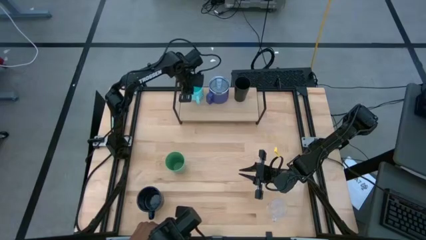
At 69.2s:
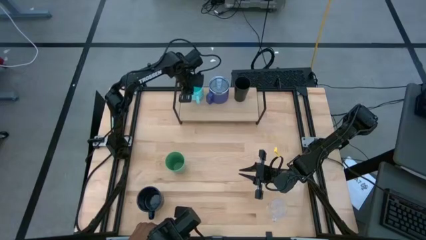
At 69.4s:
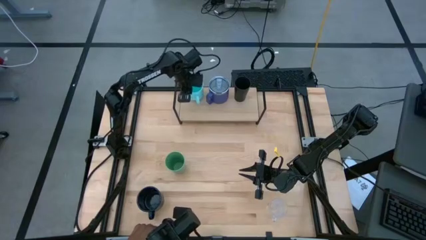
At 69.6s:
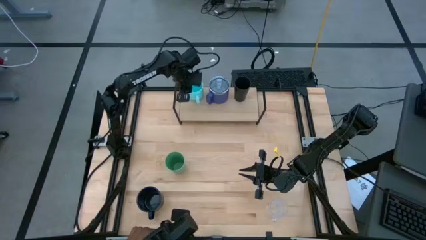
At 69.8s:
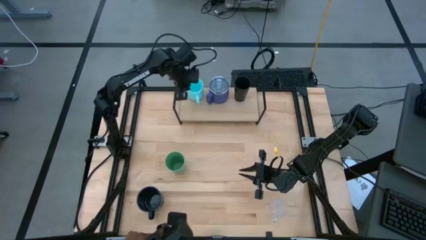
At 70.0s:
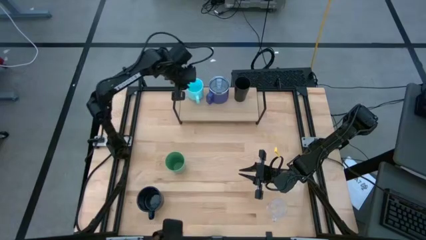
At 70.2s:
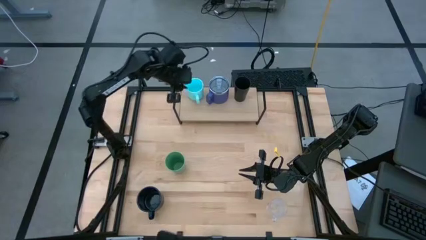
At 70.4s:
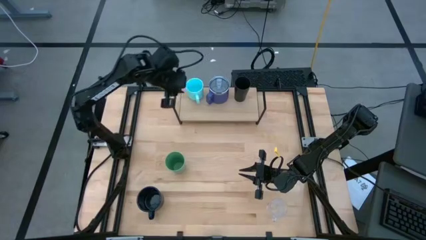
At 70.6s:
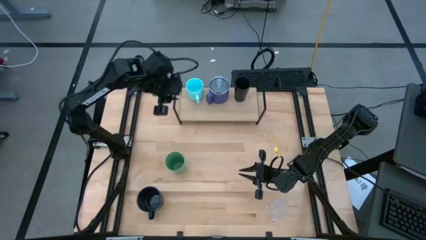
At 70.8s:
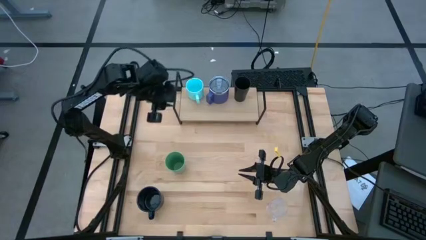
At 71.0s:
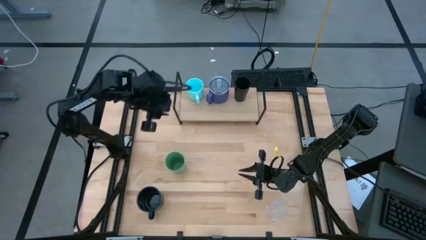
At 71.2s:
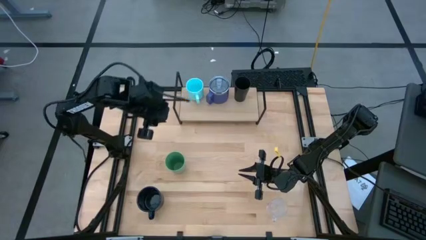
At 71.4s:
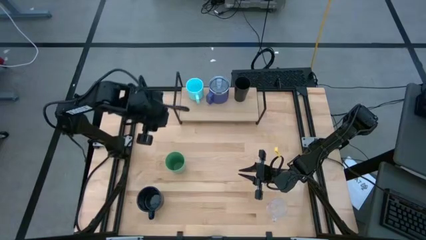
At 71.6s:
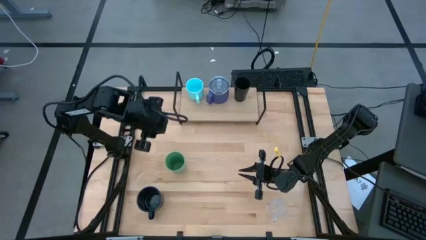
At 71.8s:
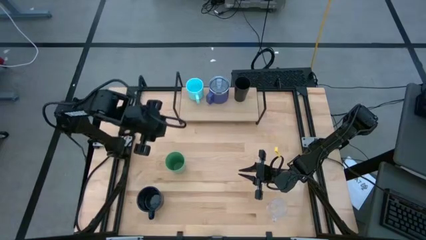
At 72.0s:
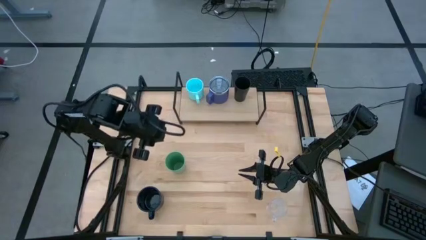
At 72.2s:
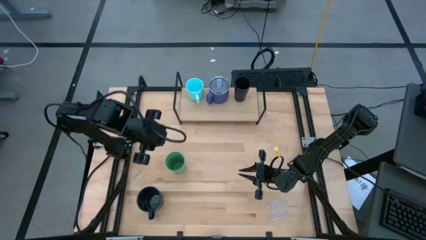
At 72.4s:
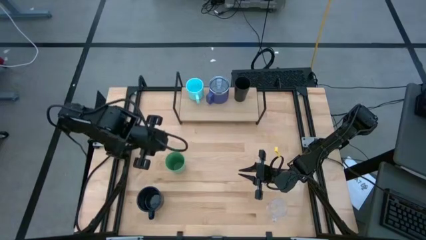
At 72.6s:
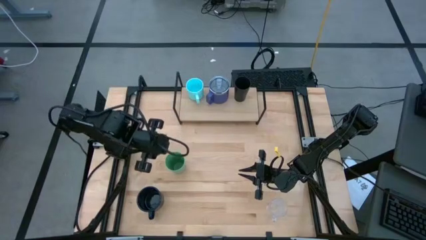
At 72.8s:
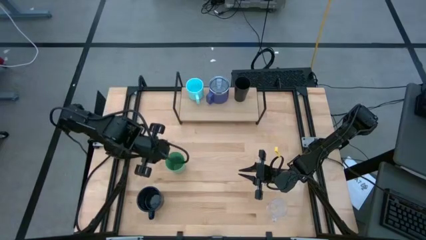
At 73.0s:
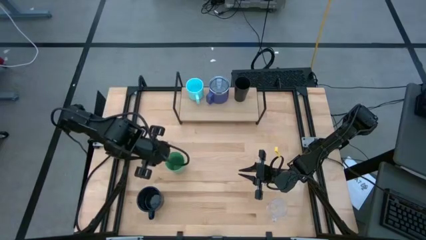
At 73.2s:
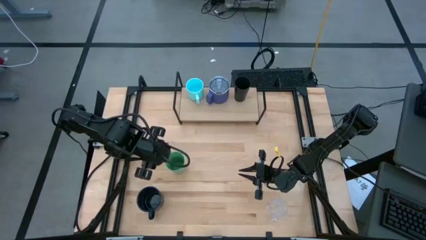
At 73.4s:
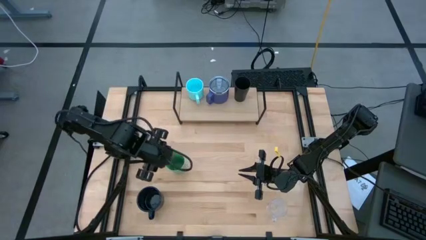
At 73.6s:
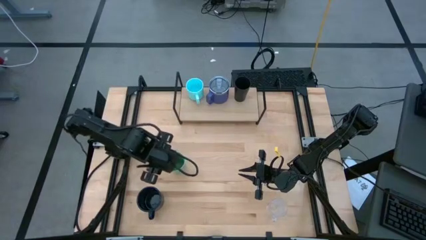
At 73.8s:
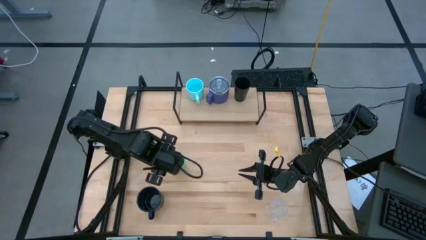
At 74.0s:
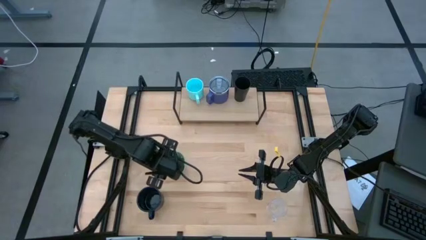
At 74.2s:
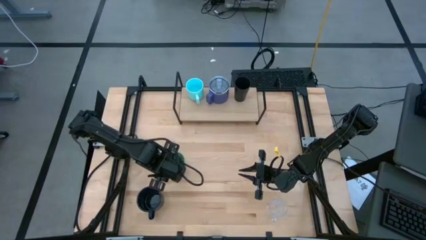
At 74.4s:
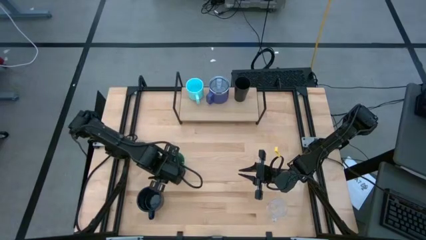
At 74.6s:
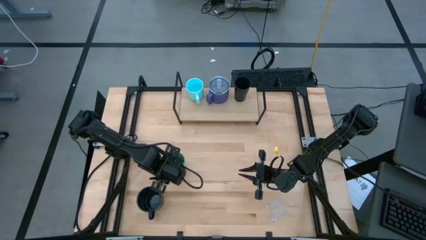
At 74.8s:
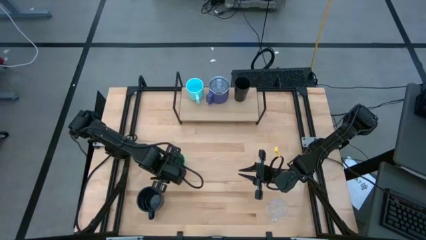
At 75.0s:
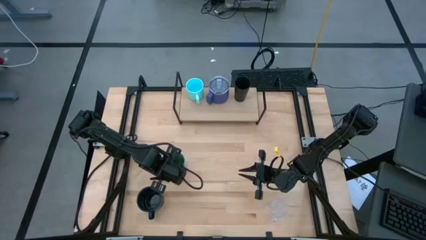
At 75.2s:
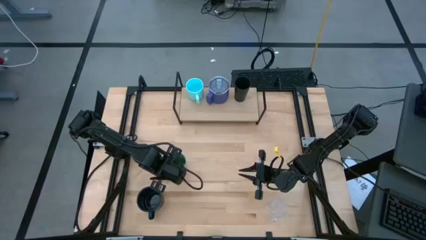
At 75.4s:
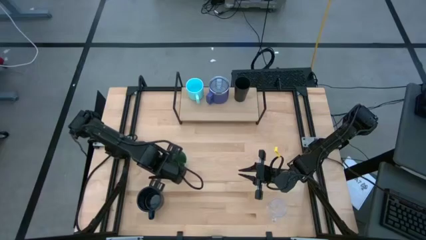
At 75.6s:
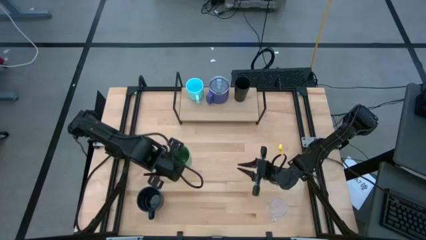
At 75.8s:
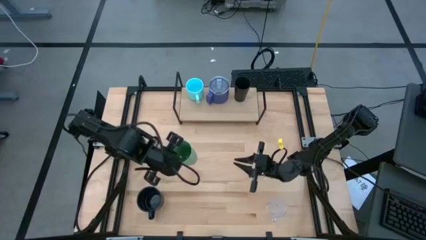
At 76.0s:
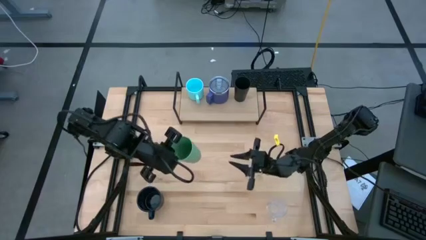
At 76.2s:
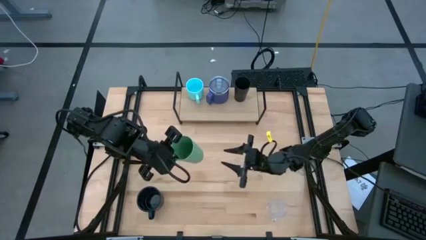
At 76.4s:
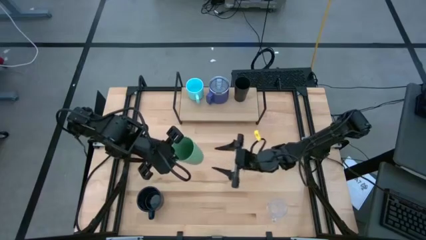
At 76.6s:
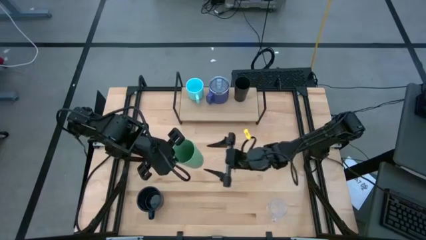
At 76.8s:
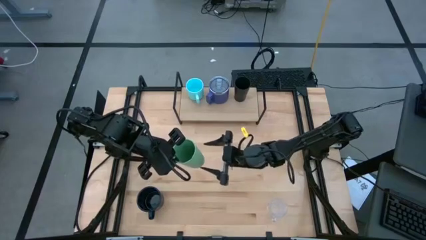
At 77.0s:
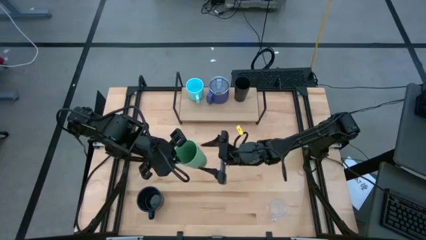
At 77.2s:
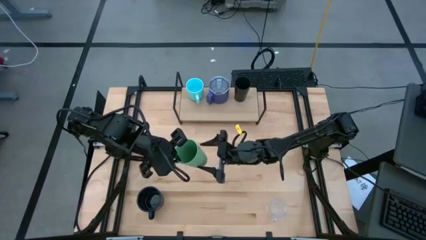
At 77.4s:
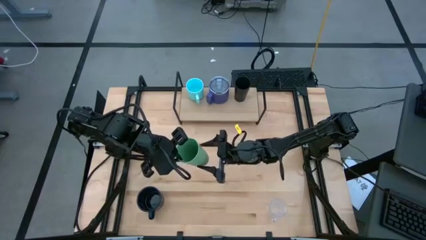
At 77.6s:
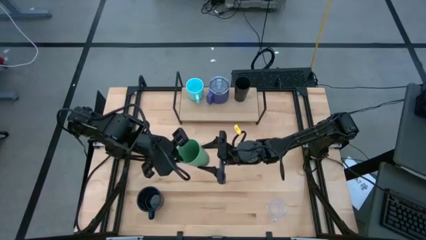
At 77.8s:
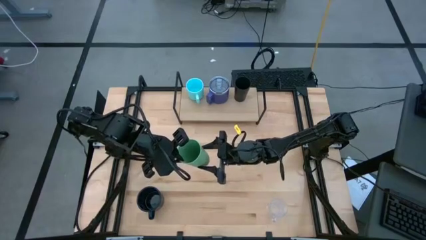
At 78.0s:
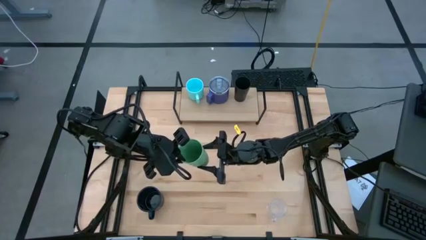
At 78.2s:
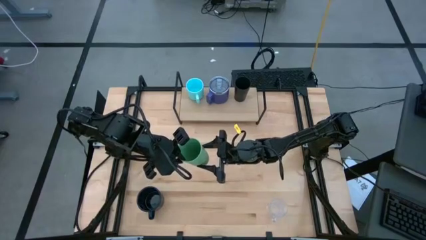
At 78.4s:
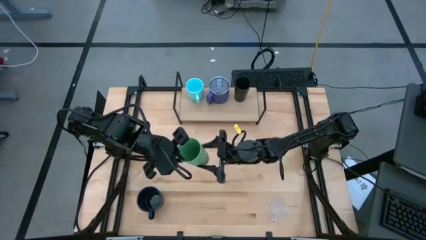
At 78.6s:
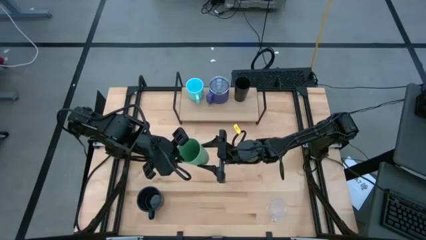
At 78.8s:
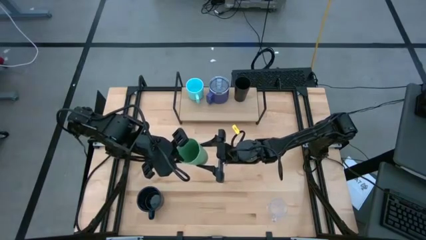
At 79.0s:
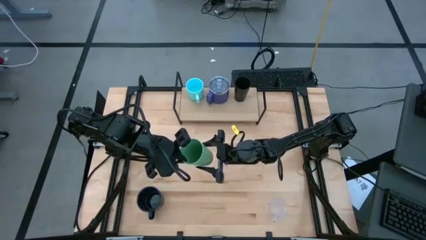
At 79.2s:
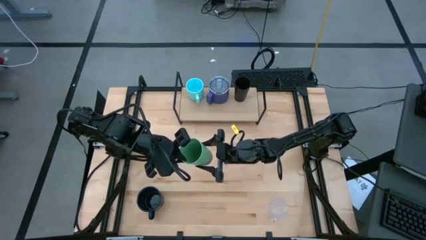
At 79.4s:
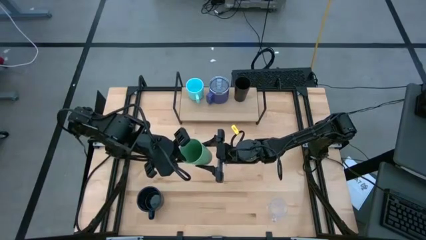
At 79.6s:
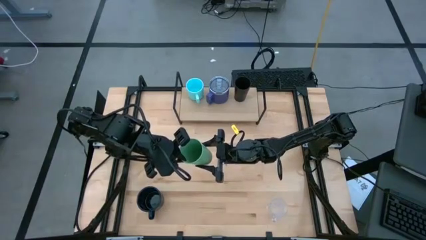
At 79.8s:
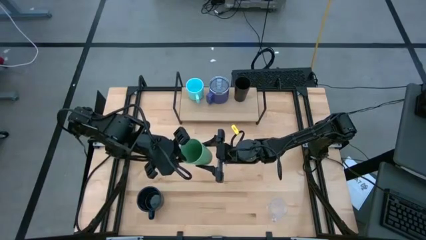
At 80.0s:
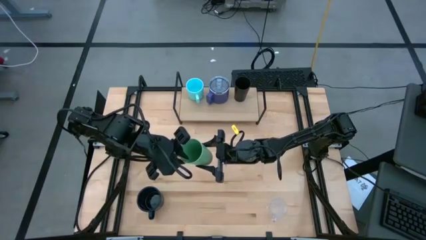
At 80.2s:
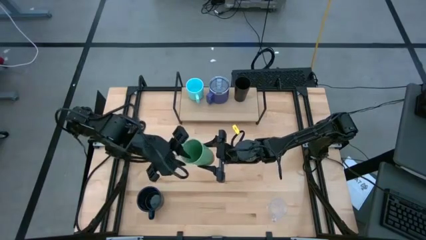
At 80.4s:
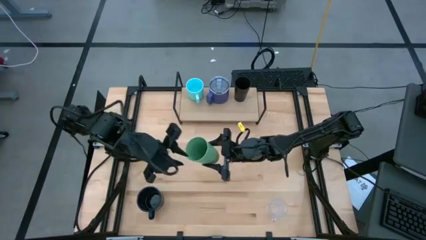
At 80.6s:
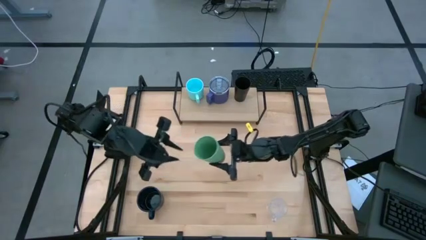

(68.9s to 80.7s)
Task: Stack small to large cups/mugs on shelf
Put the green cup on the shelf

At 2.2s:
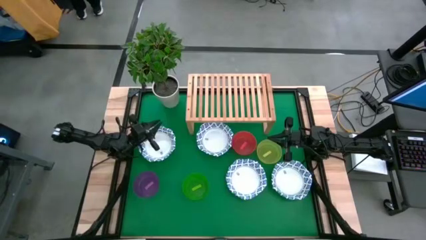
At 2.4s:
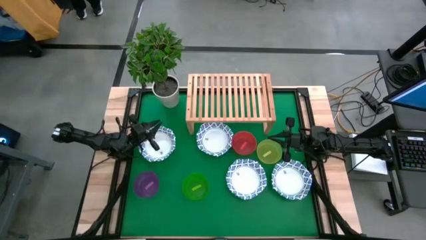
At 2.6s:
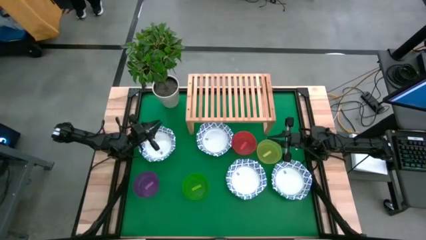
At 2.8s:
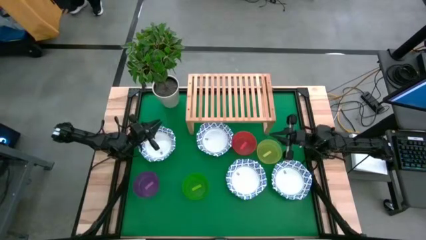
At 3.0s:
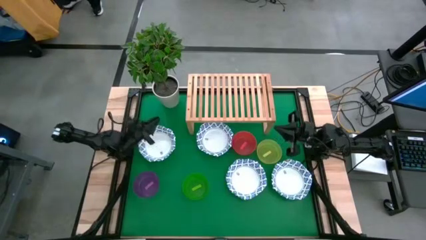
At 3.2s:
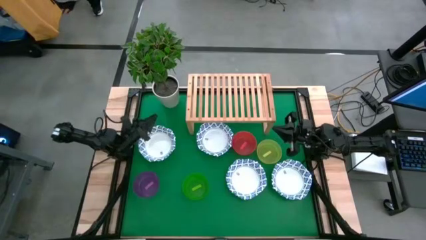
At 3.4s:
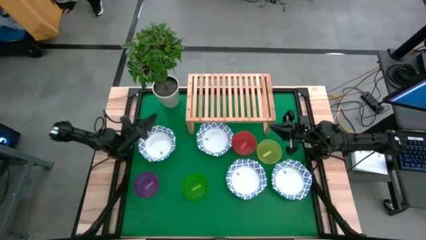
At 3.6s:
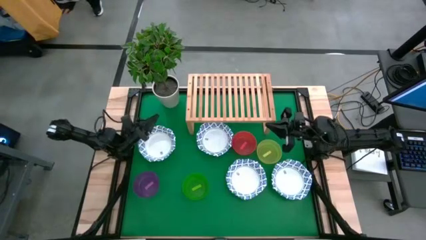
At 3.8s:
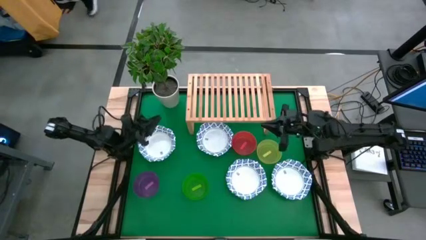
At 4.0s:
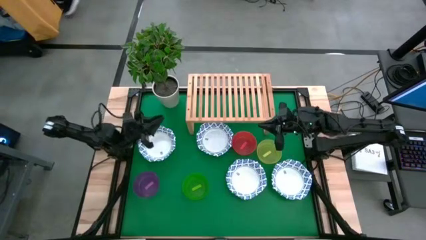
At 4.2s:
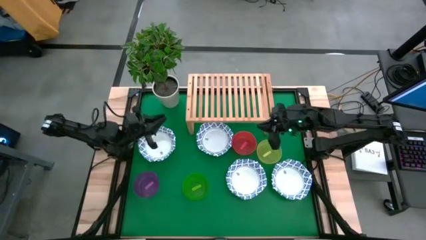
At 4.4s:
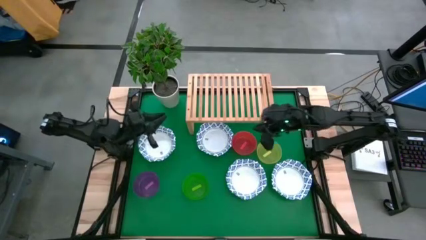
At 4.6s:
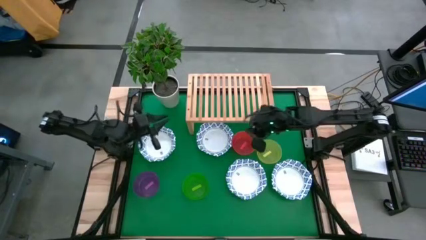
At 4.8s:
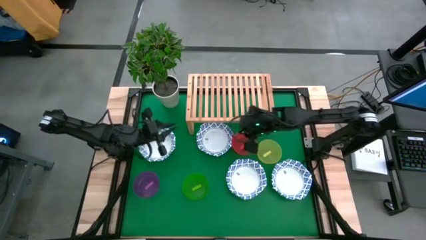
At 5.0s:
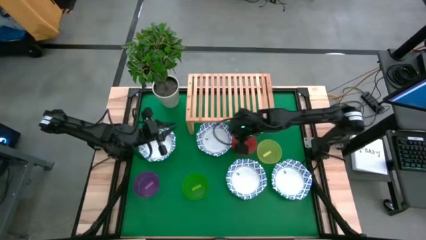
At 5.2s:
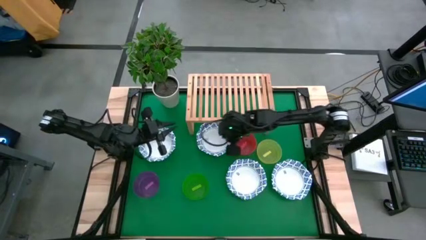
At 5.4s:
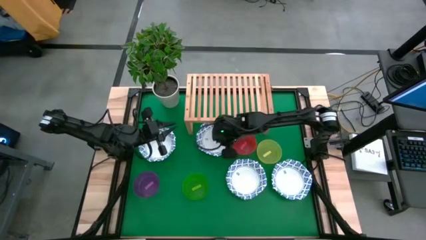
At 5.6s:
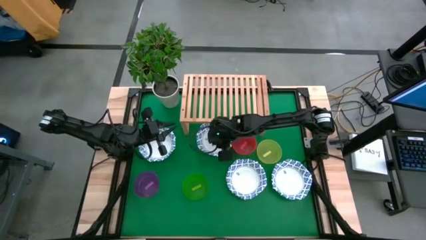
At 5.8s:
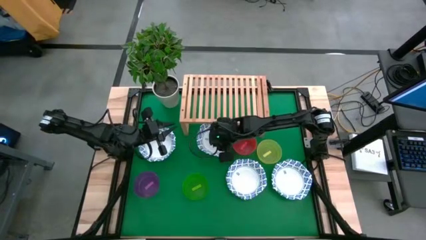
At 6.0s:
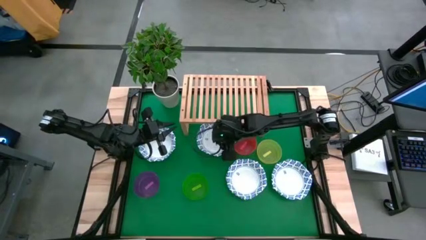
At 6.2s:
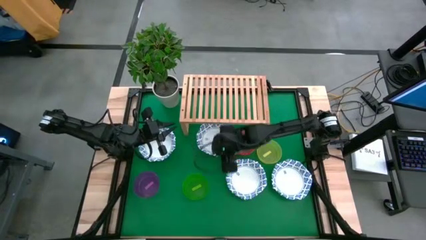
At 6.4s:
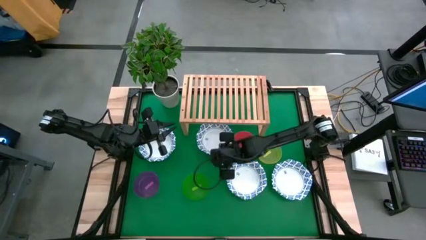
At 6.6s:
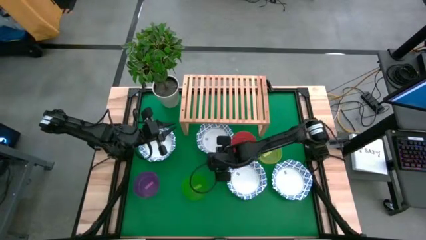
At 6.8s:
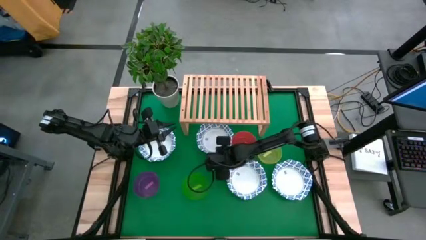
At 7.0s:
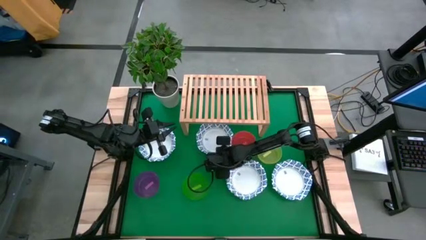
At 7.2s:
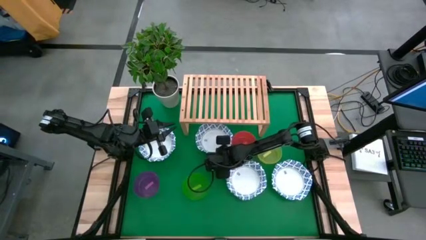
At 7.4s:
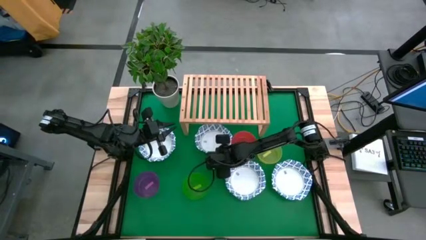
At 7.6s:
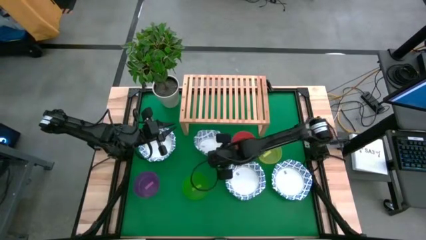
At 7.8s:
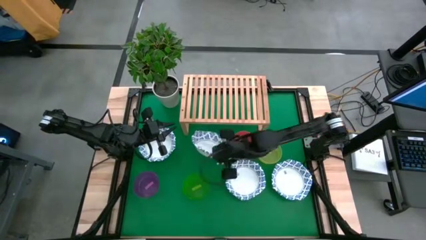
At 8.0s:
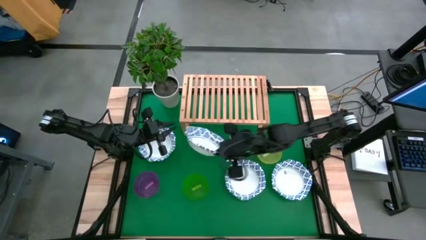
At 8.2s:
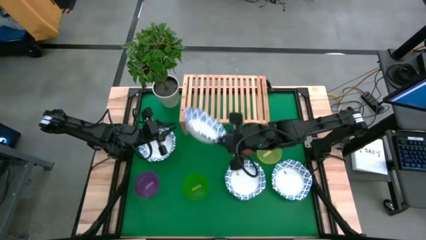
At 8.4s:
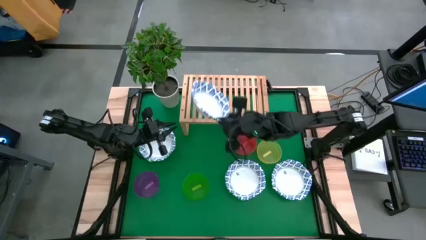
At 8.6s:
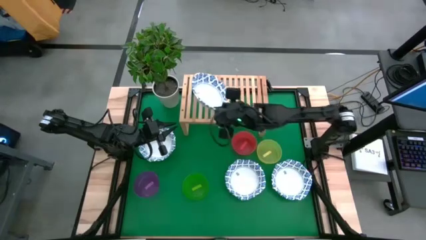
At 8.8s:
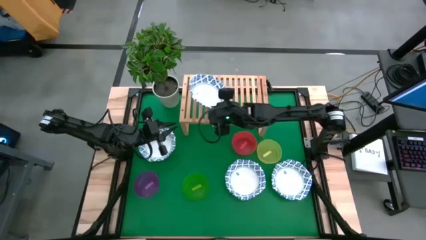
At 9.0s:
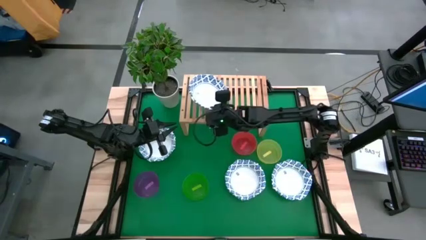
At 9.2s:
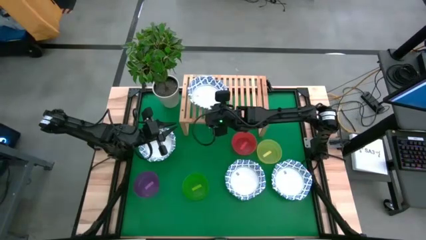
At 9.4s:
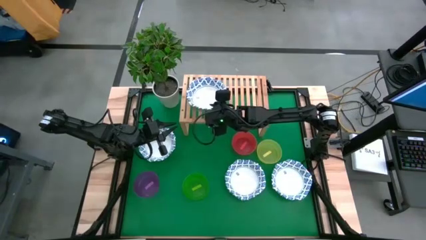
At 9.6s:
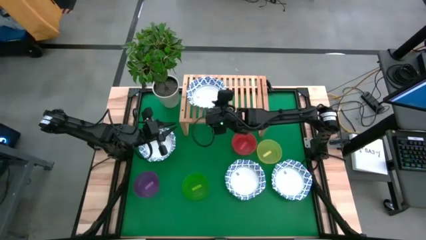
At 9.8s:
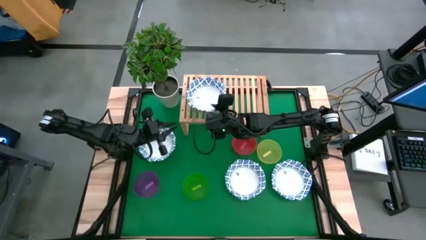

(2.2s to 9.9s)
Task: Place and stack bowls onto a shelf
Put the white and blue bowl on the shelf
